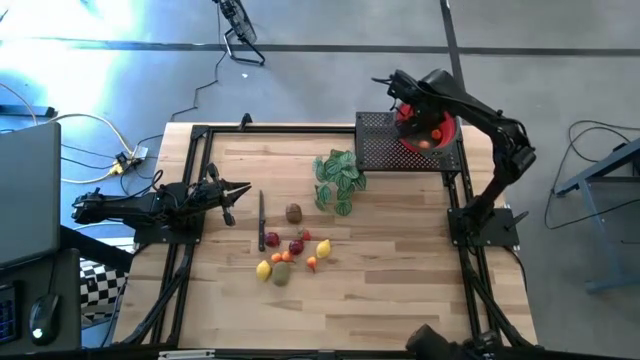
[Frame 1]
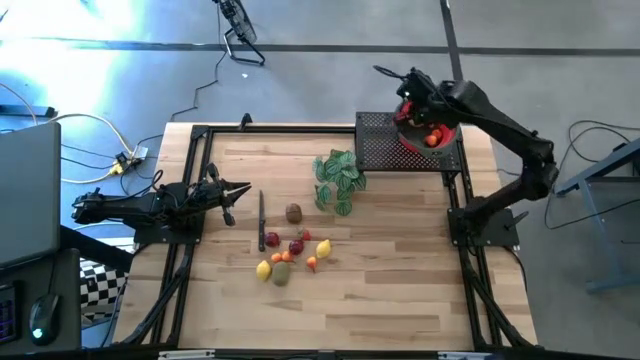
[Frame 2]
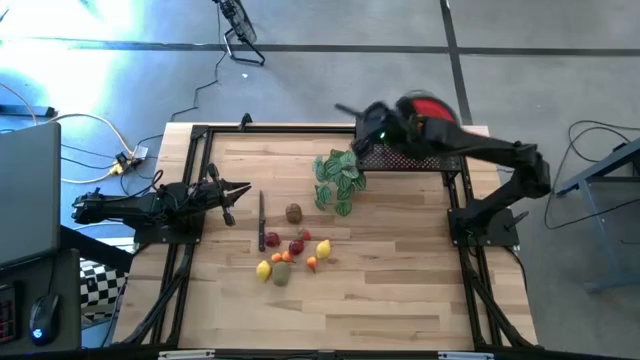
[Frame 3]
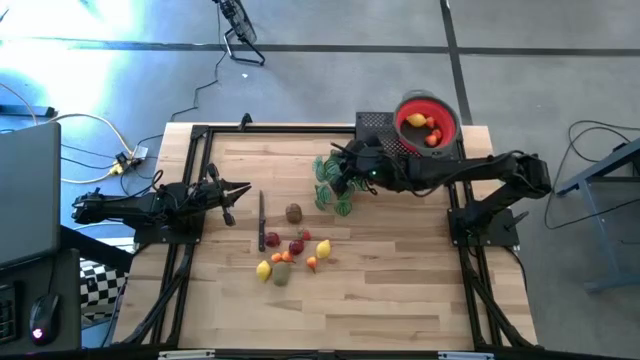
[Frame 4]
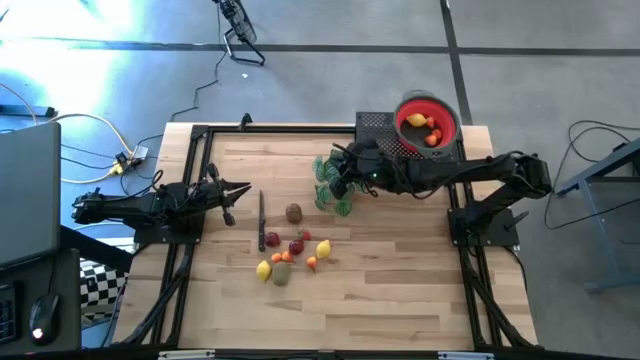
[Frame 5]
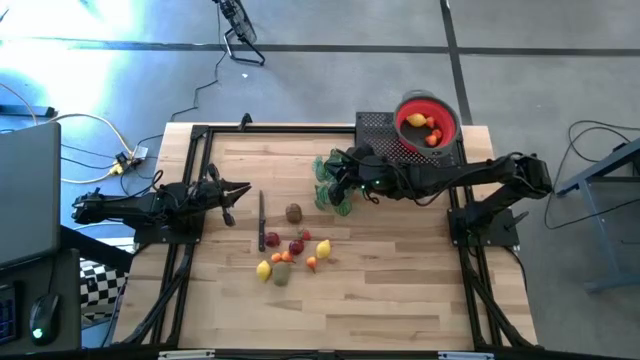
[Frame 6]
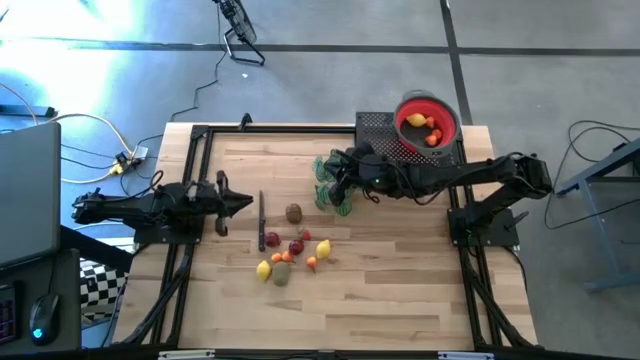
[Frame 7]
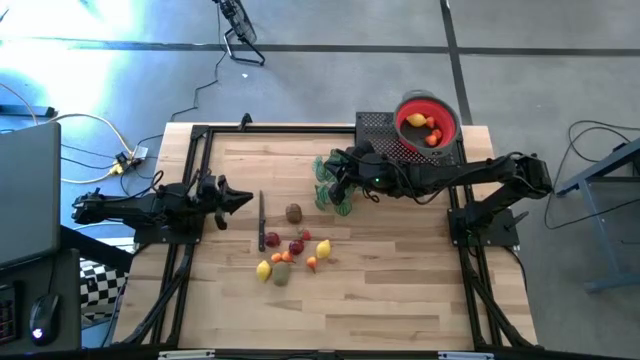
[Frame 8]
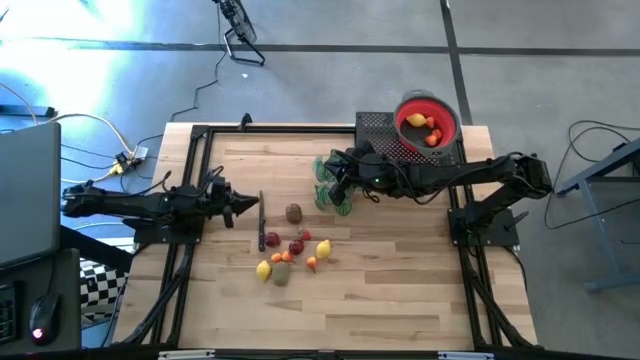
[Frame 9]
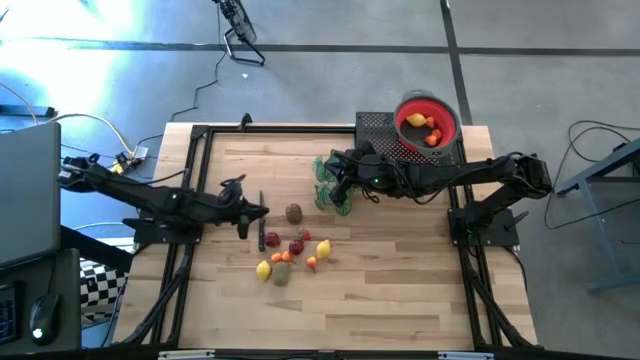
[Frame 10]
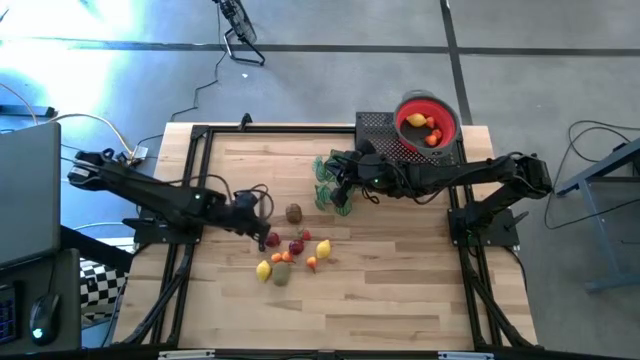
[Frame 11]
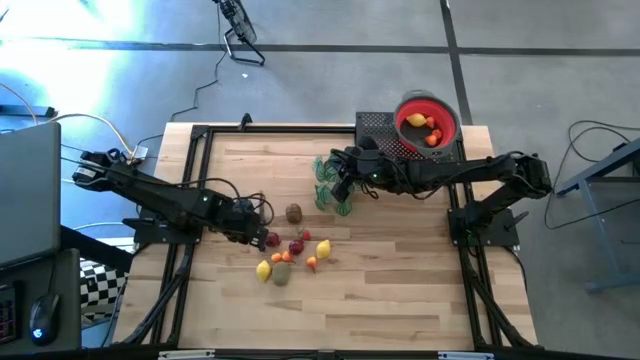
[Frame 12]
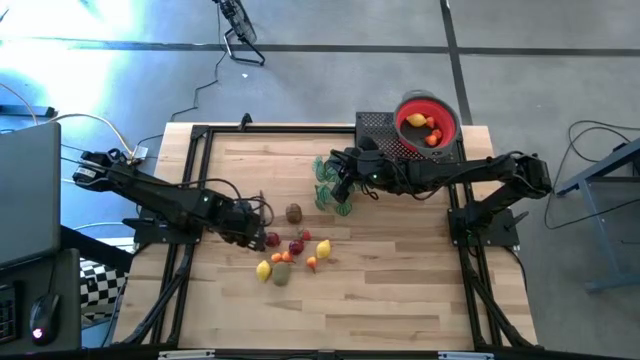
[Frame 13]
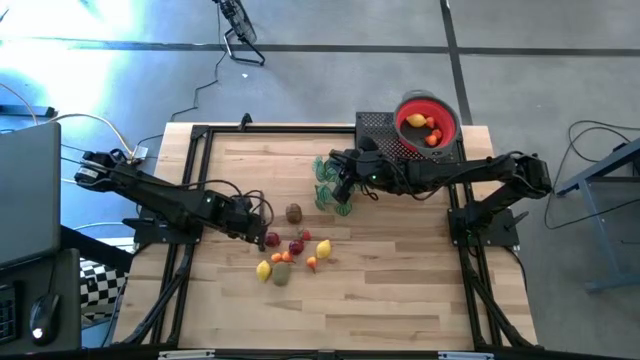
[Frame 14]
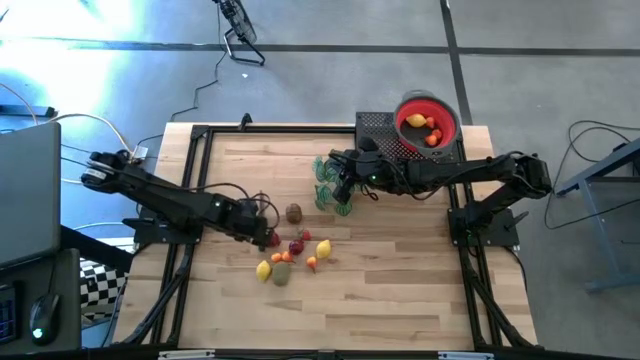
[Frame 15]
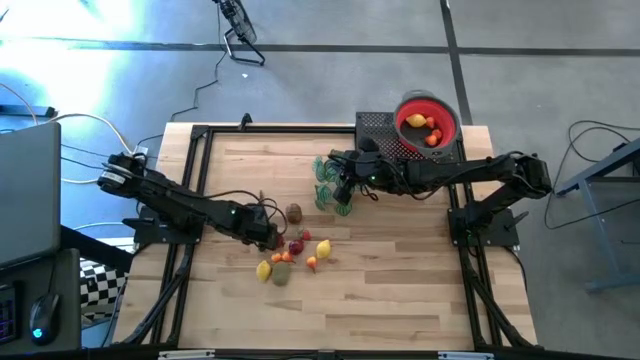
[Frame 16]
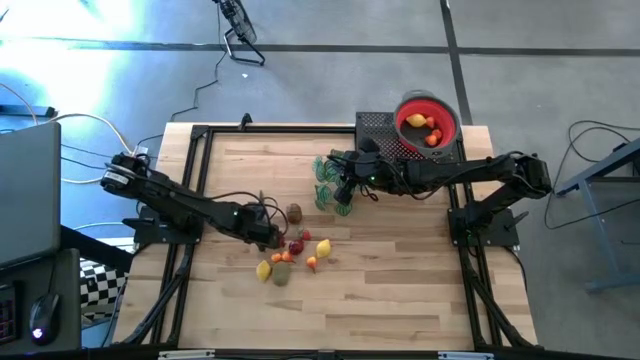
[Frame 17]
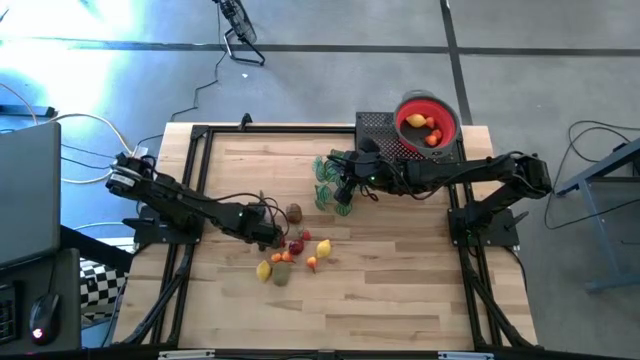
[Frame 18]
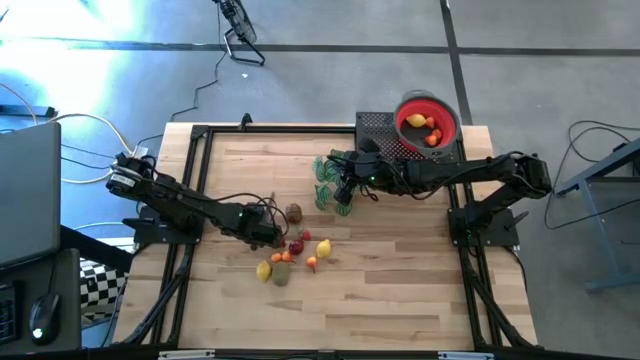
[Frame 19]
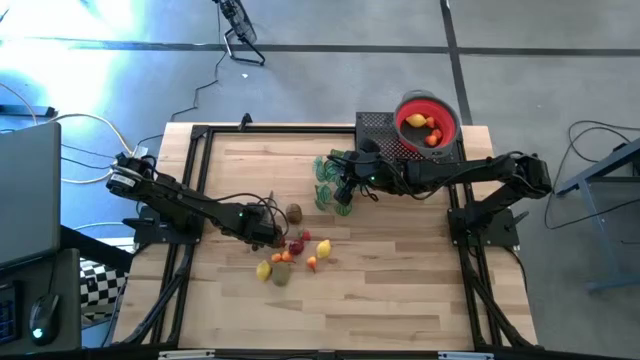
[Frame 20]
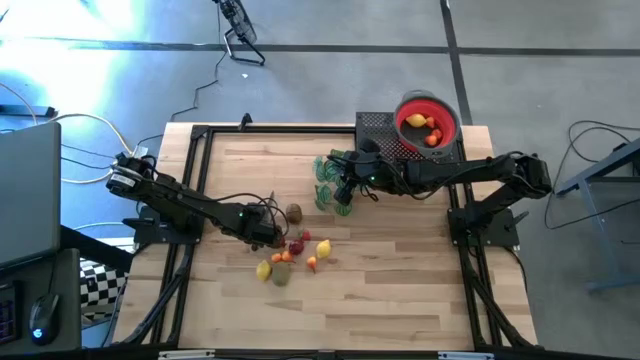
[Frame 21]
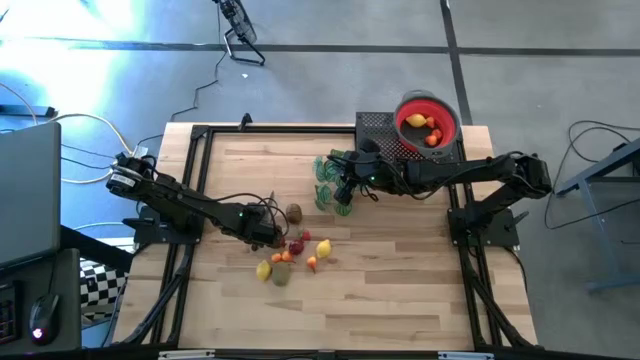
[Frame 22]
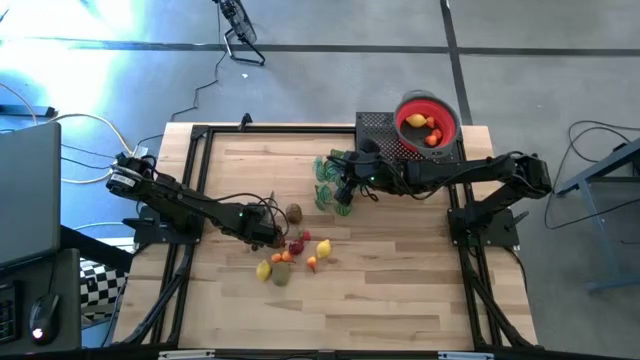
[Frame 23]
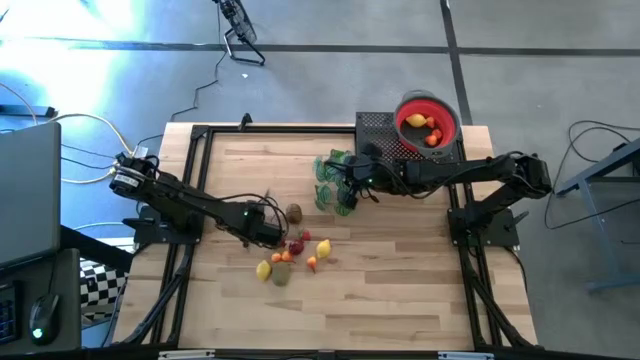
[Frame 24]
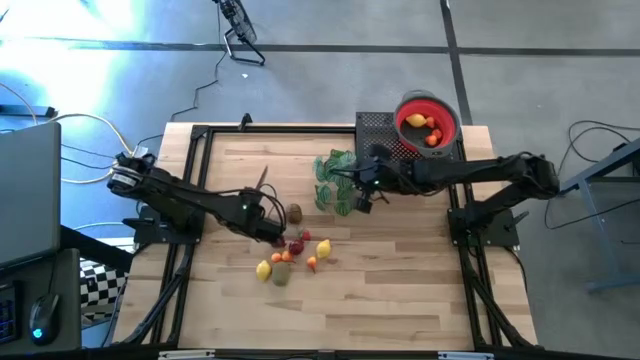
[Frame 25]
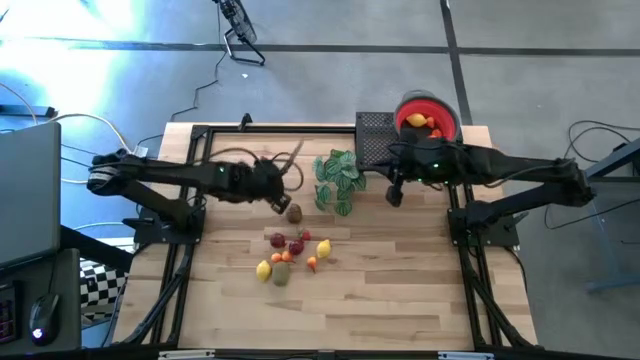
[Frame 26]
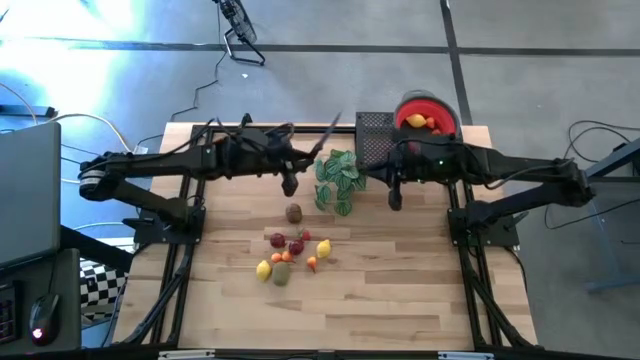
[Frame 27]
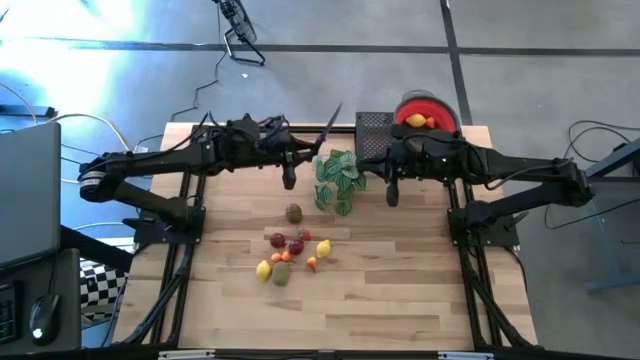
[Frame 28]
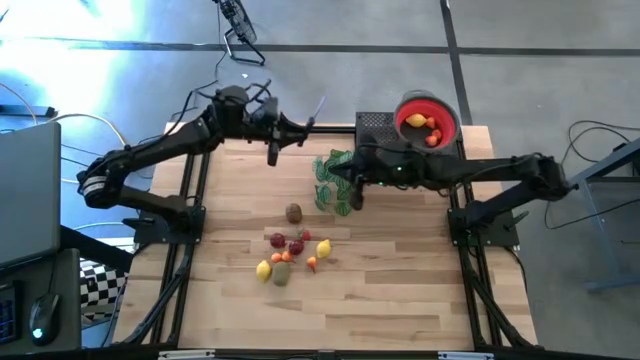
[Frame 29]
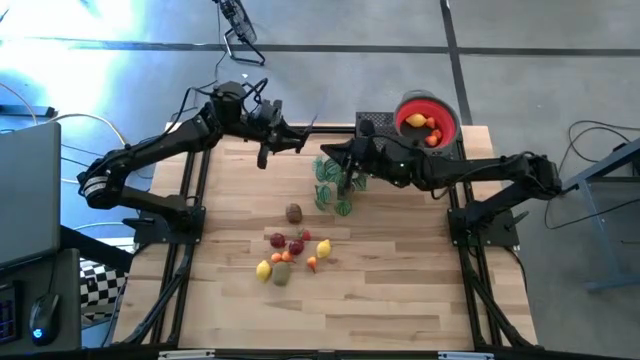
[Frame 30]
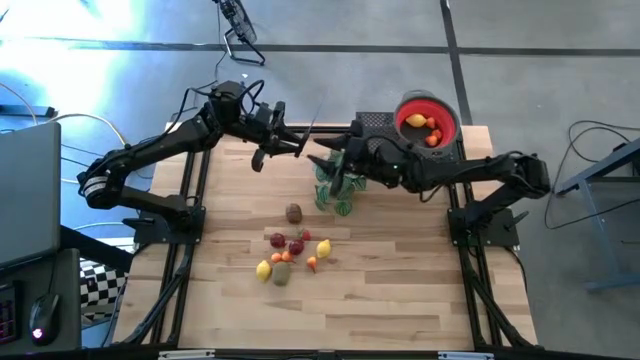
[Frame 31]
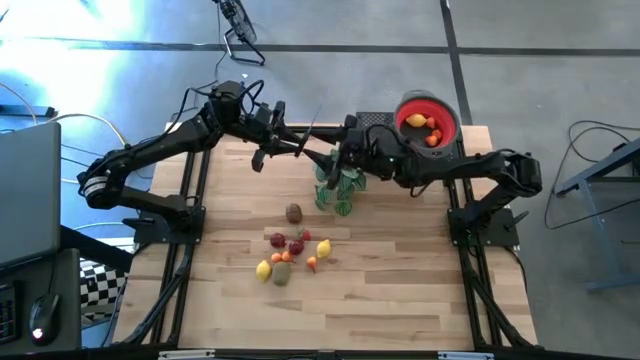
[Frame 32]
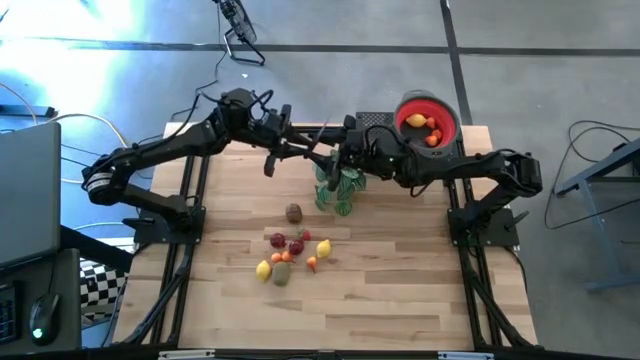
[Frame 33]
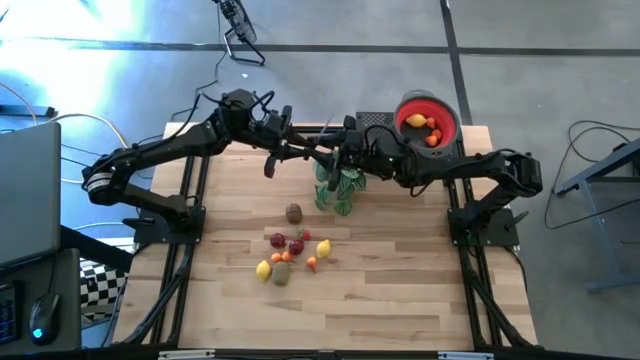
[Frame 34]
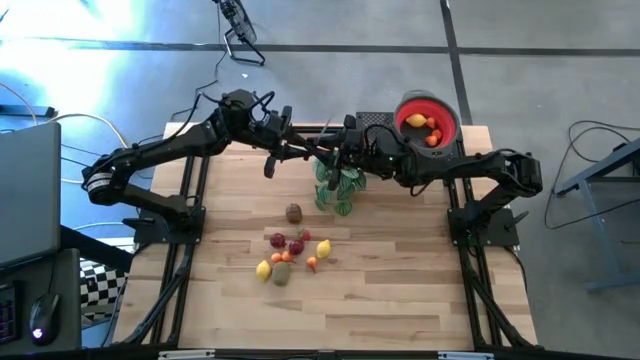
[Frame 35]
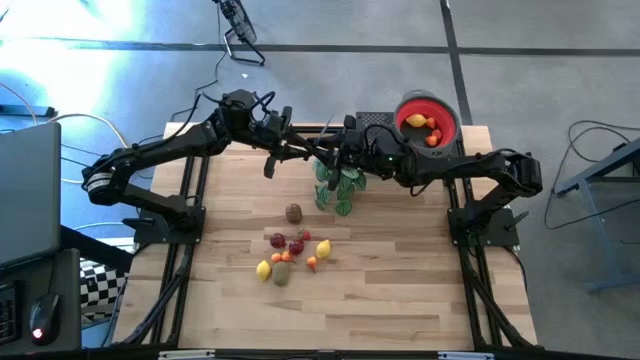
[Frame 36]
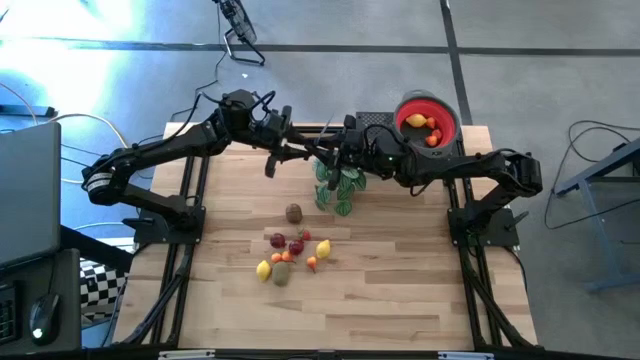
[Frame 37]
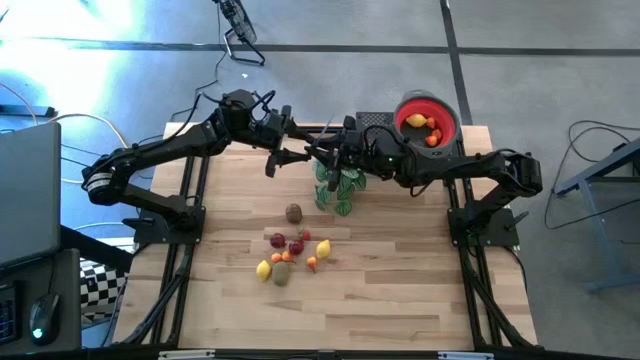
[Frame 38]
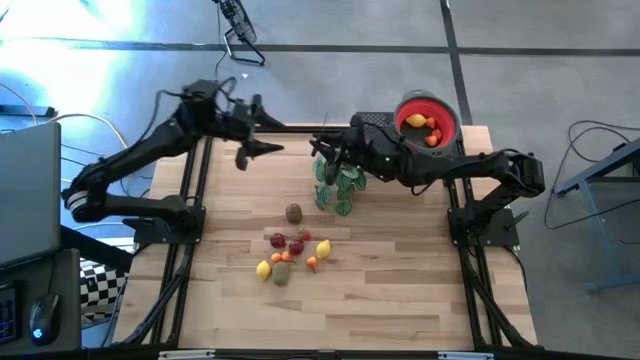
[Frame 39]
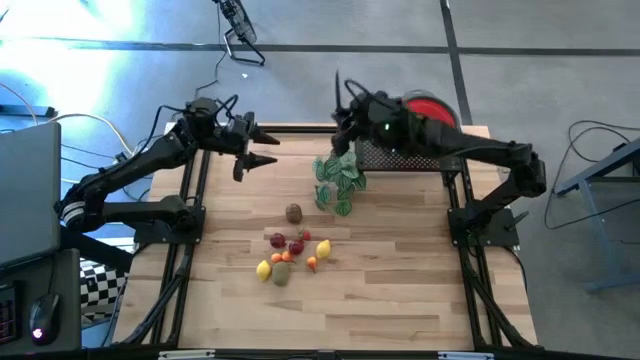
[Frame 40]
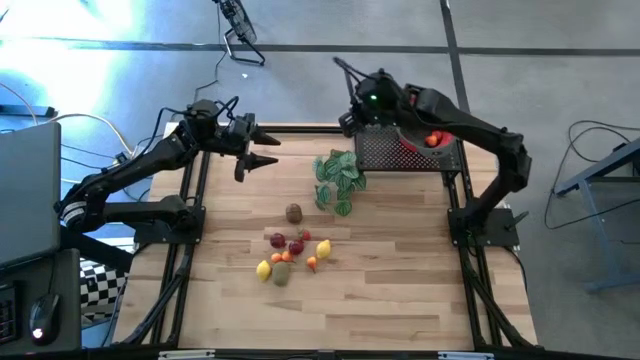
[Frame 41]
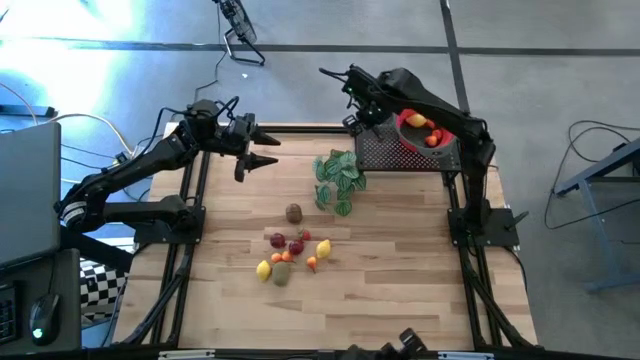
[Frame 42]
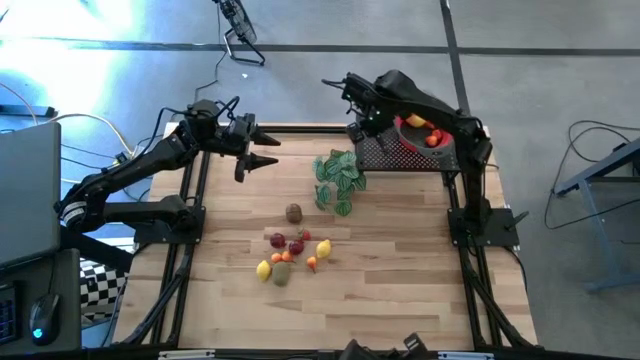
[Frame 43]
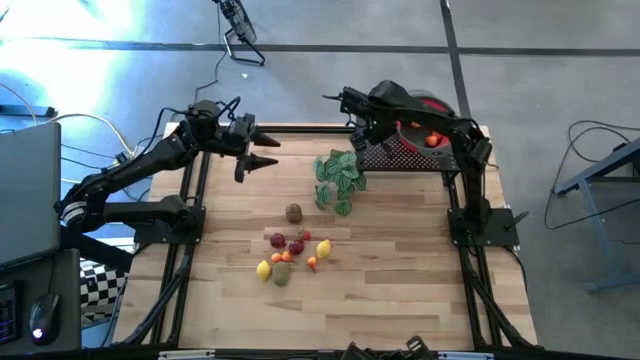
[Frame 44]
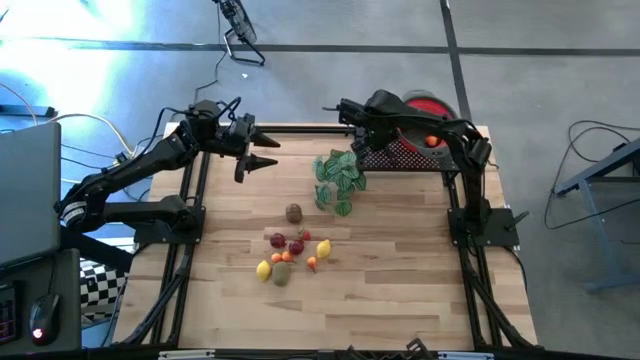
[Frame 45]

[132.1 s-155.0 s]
Task: Pick & Place Fruit
Put the black knife on the shelf
